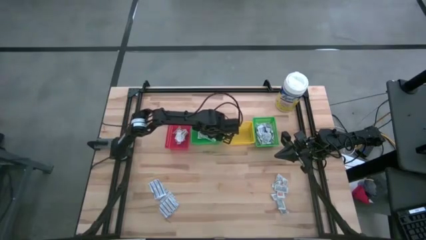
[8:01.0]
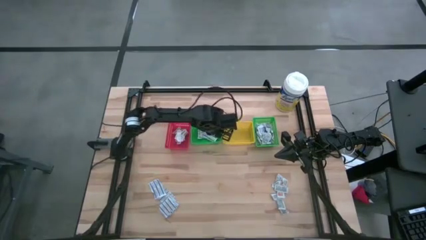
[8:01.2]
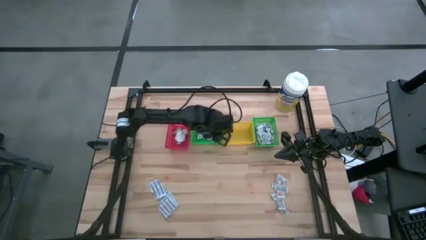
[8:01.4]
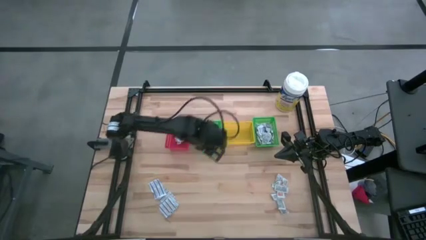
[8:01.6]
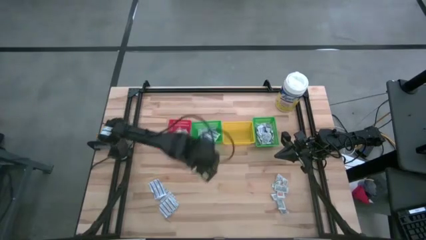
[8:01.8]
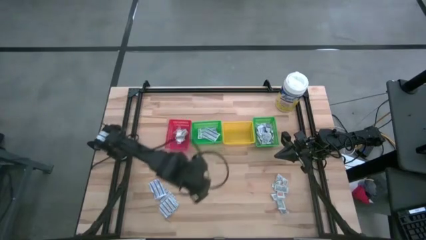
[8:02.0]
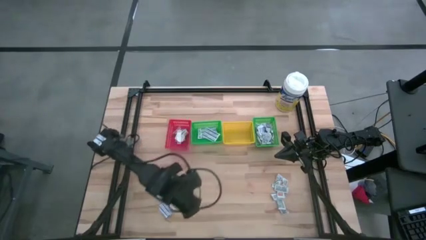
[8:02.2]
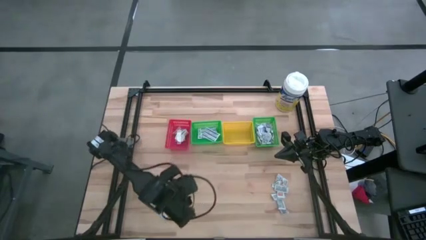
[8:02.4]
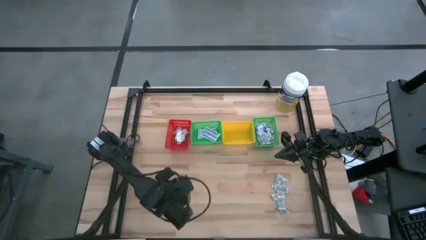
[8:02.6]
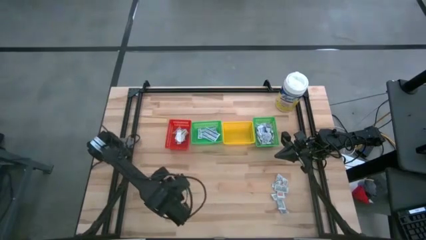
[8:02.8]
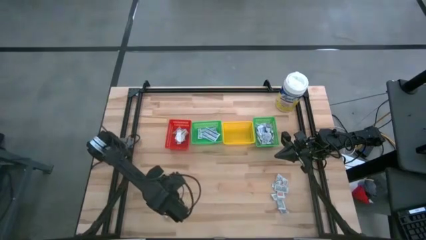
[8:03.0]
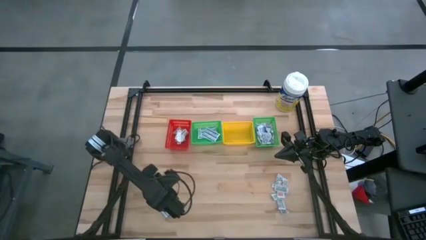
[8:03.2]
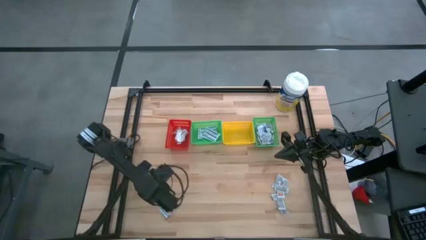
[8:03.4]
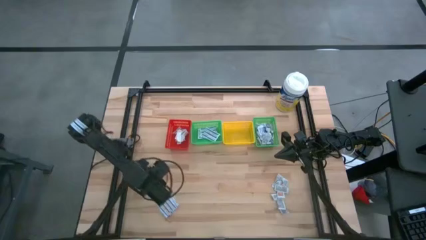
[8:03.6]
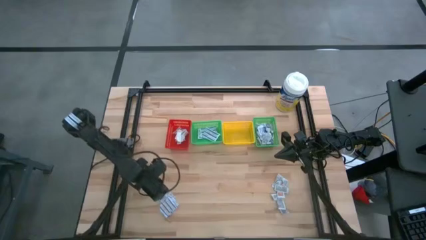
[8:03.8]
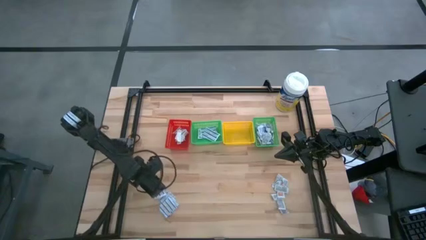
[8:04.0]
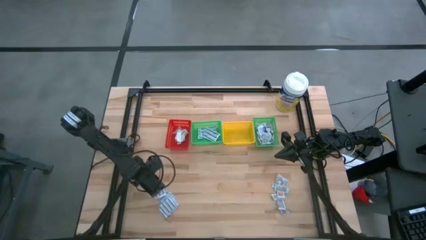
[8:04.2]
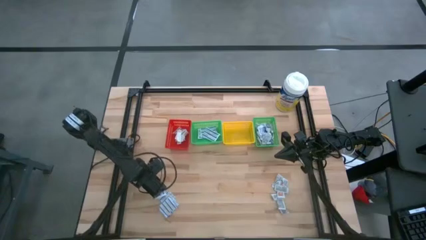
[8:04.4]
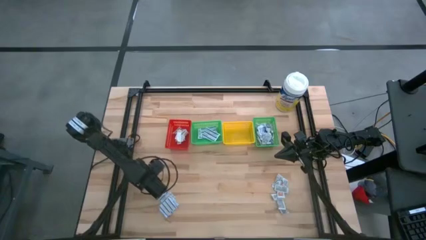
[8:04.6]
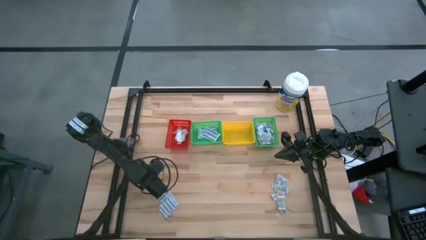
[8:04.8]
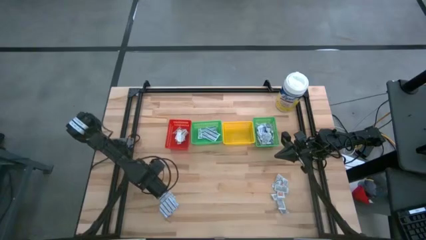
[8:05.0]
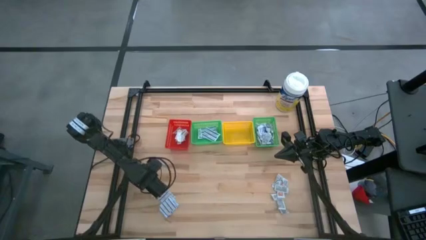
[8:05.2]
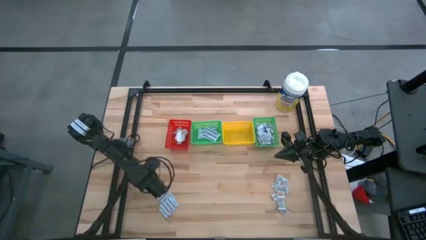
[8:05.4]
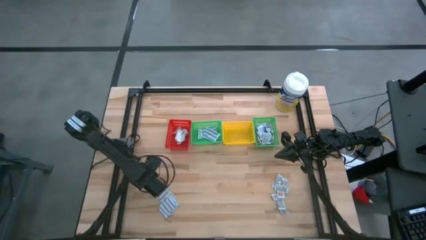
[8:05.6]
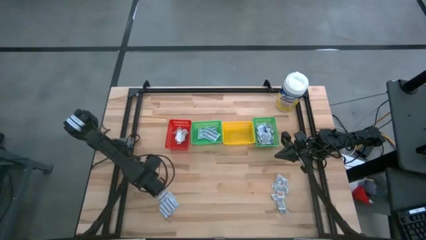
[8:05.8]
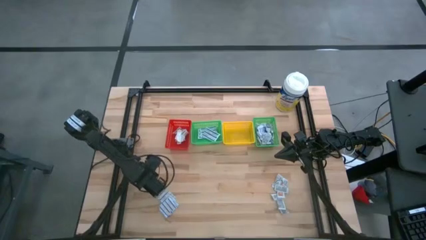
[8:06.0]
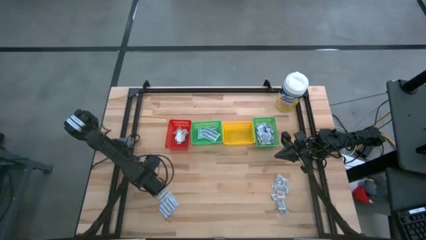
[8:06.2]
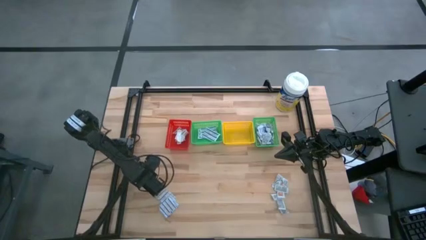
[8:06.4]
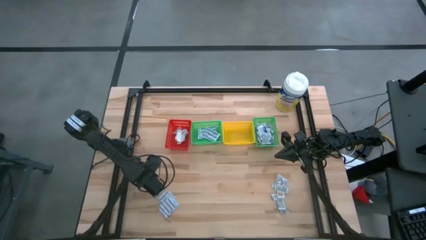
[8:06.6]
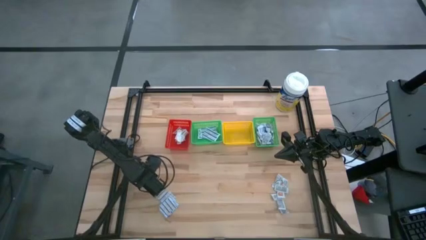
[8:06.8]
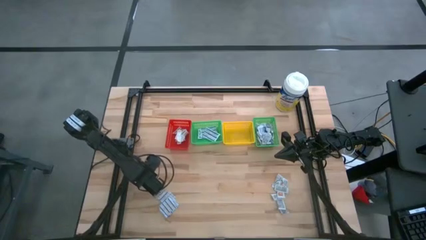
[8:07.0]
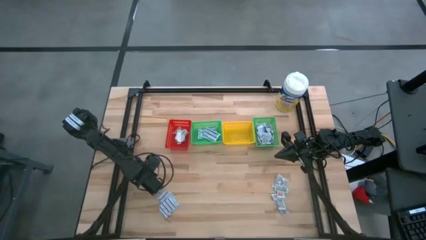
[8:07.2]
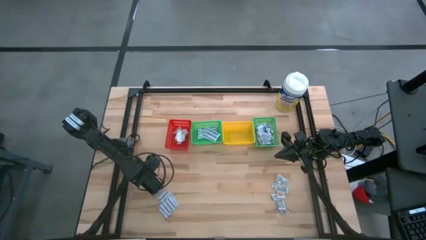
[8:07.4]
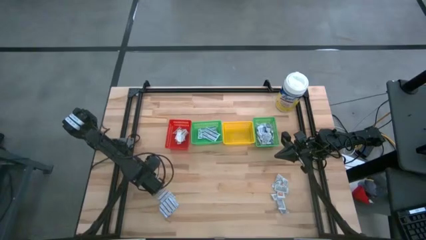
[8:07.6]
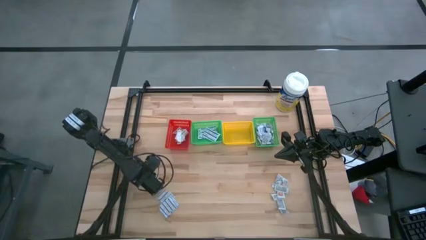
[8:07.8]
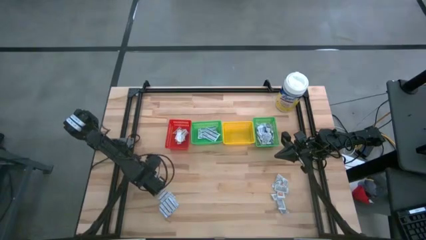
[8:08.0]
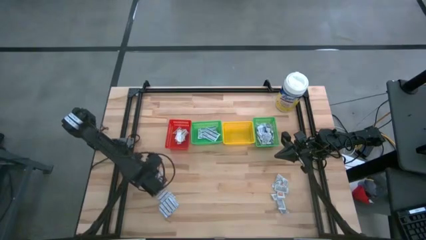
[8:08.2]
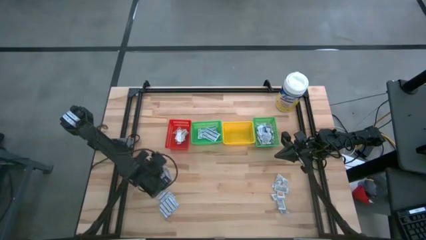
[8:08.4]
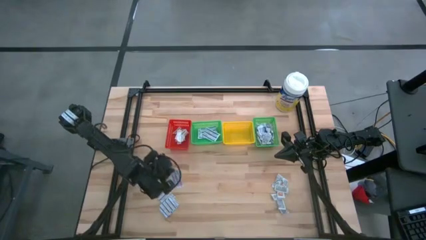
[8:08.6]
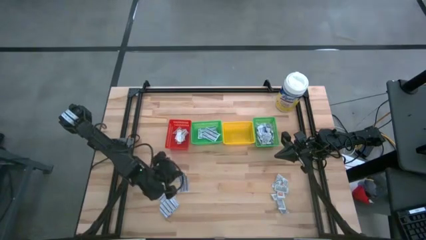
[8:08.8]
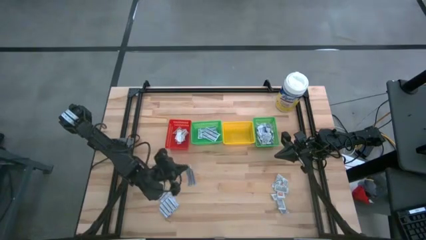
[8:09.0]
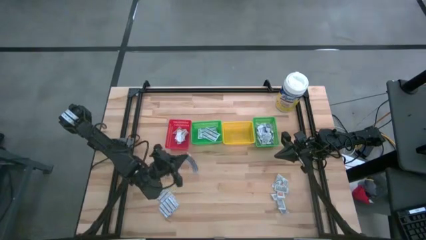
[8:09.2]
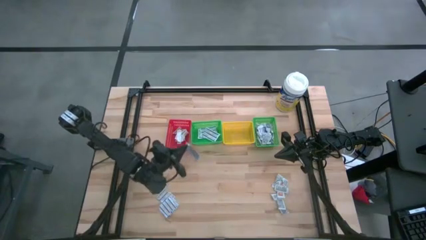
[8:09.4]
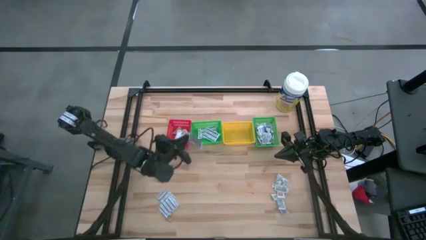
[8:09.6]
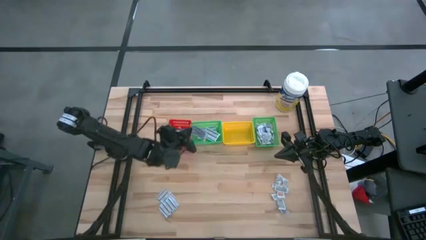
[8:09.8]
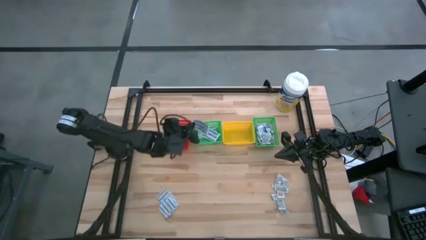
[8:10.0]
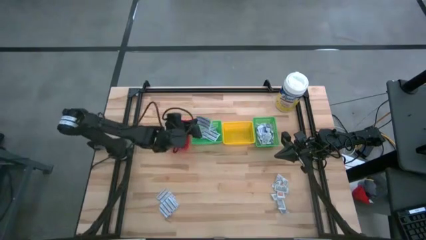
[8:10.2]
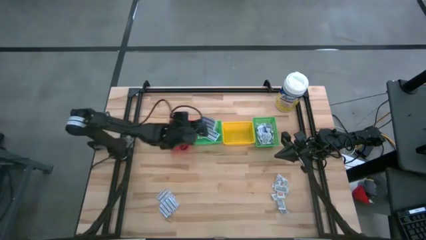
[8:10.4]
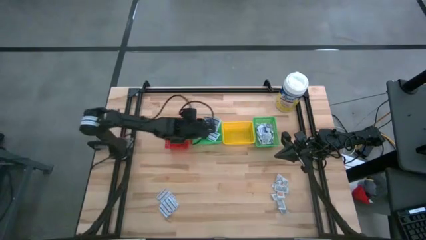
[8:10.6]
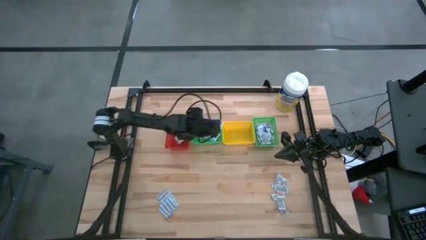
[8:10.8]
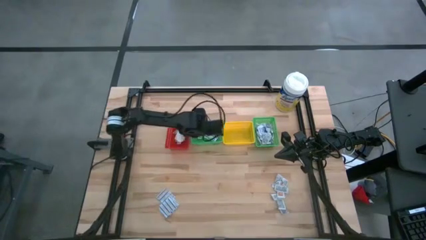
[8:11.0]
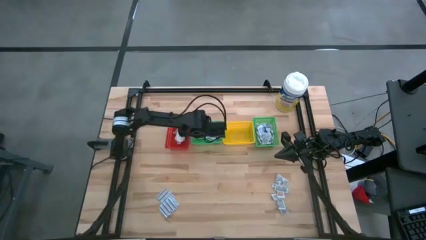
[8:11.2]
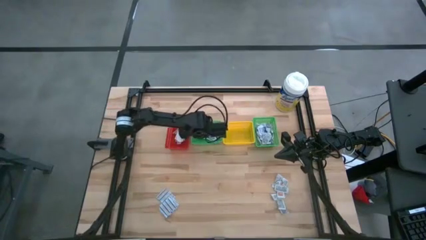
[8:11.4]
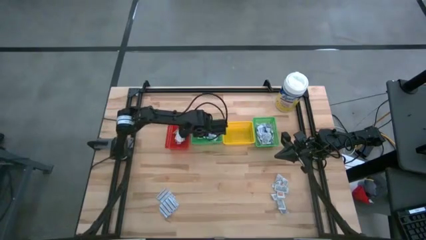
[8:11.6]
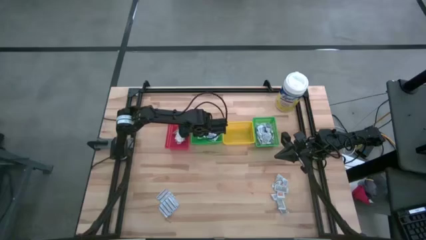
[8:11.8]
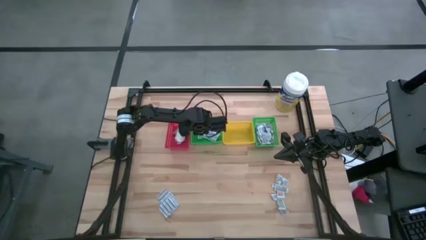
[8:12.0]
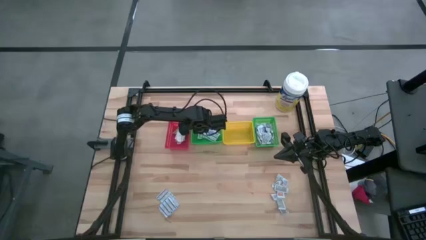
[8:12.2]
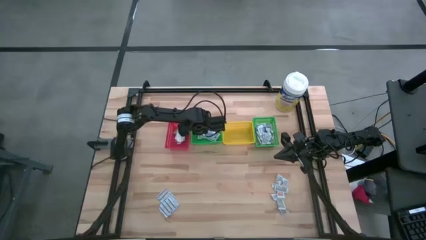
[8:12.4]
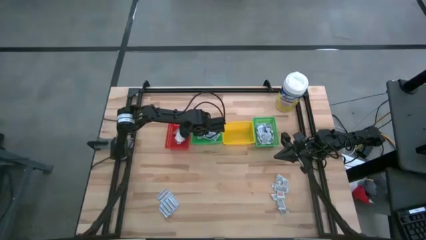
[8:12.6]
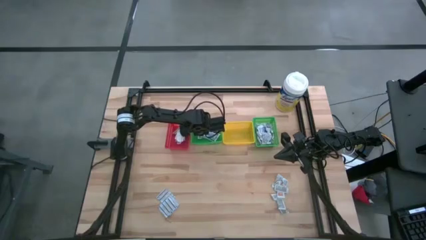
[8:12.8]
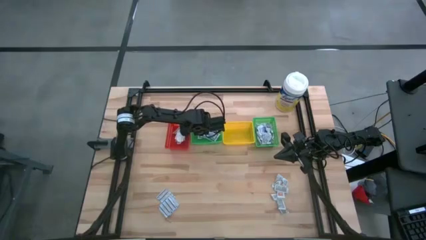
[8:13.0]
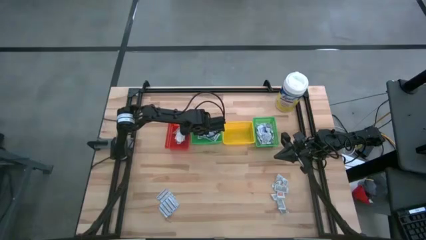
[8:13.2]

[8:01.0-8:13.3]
Task: Pick & Place First Aid Supplies
Put the blue bandage into the left green bin
